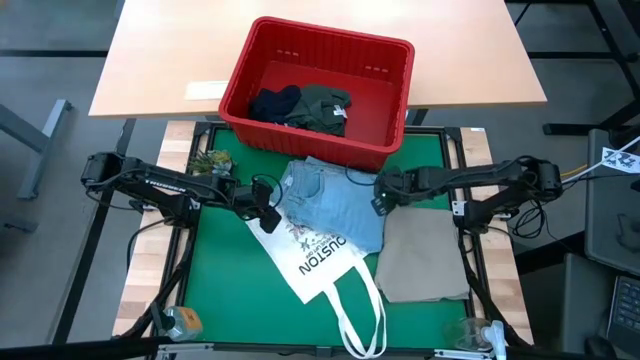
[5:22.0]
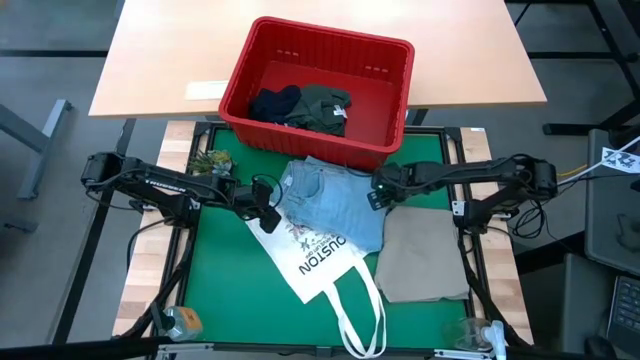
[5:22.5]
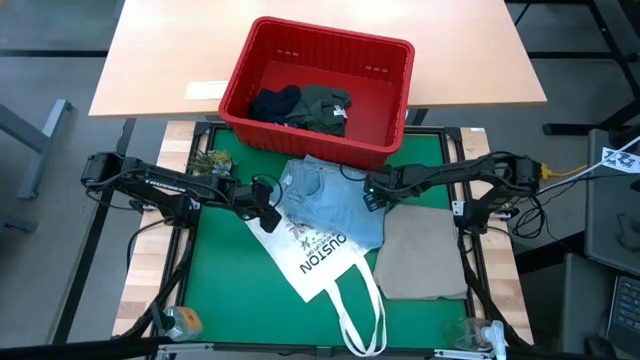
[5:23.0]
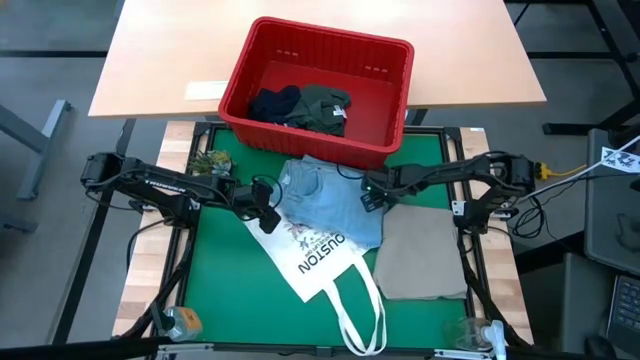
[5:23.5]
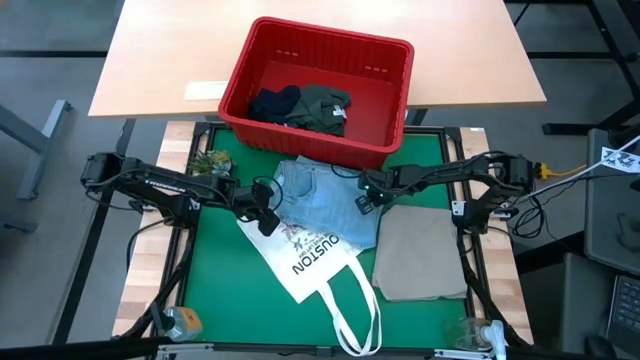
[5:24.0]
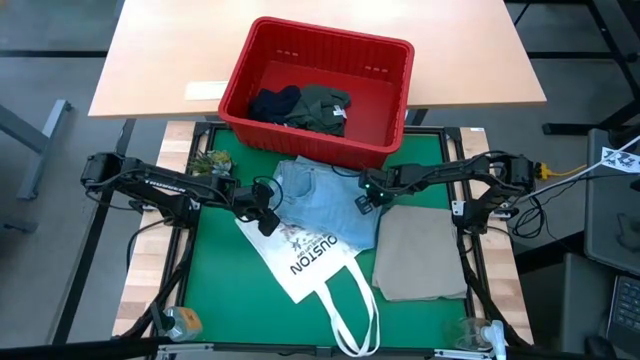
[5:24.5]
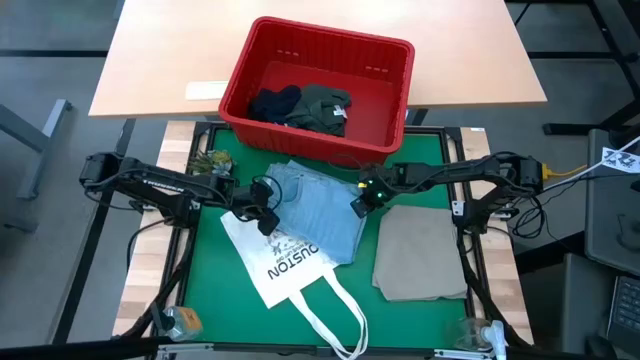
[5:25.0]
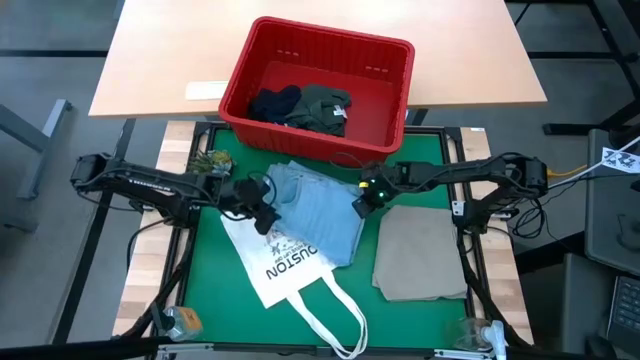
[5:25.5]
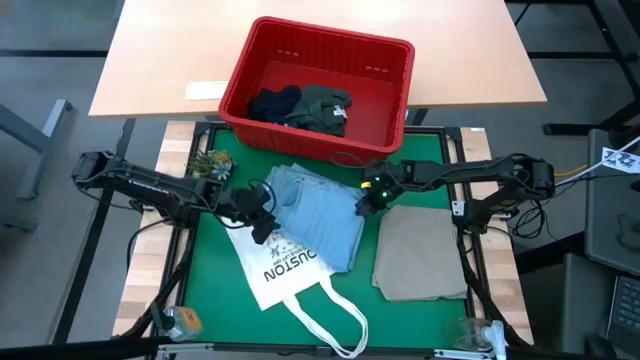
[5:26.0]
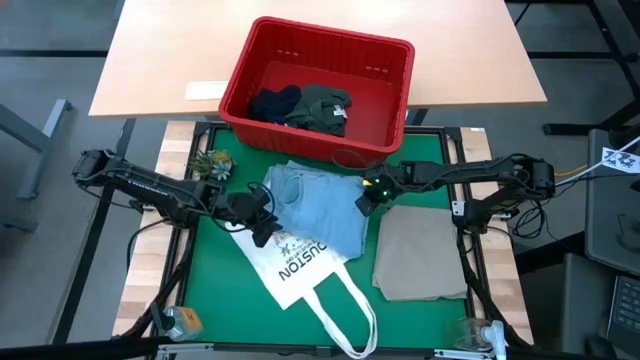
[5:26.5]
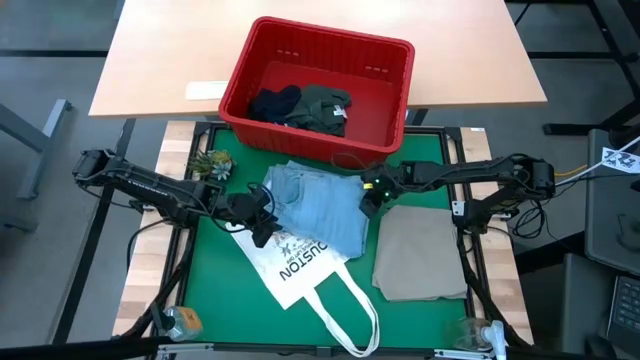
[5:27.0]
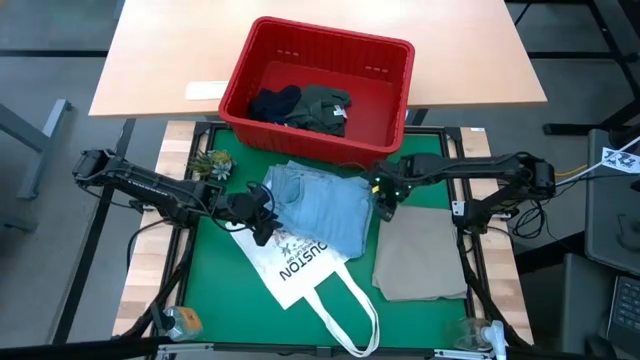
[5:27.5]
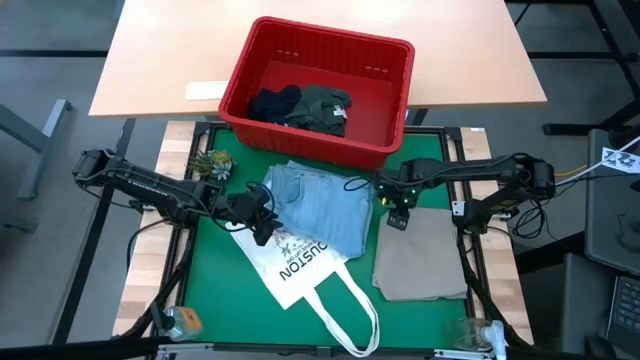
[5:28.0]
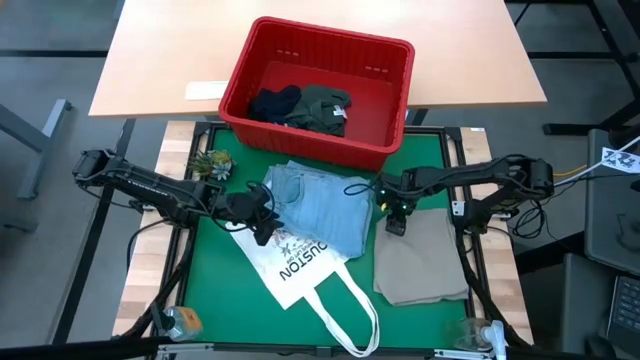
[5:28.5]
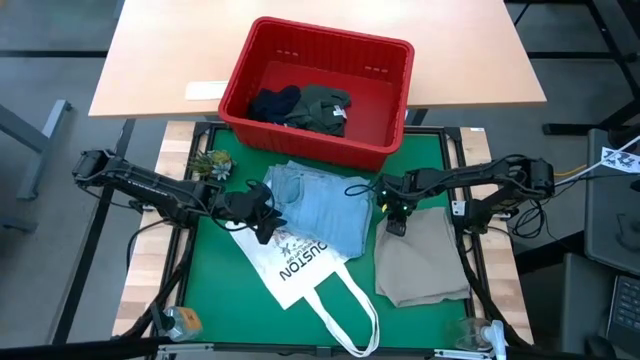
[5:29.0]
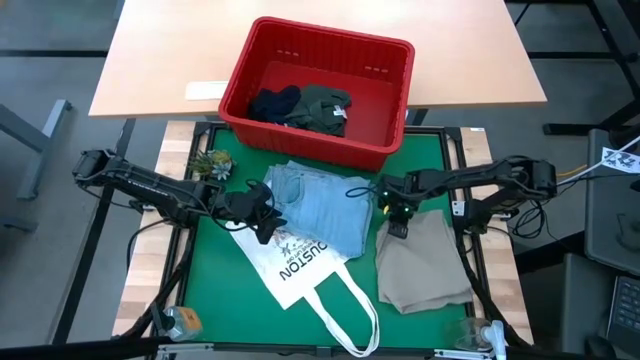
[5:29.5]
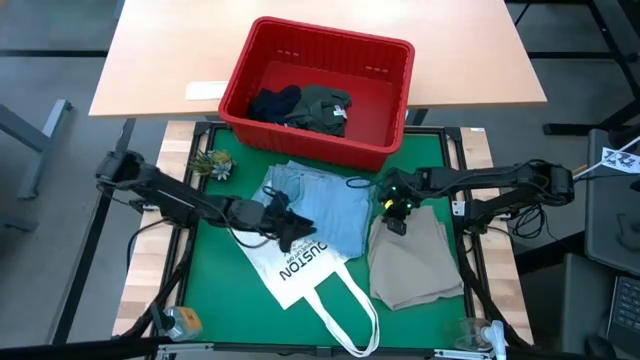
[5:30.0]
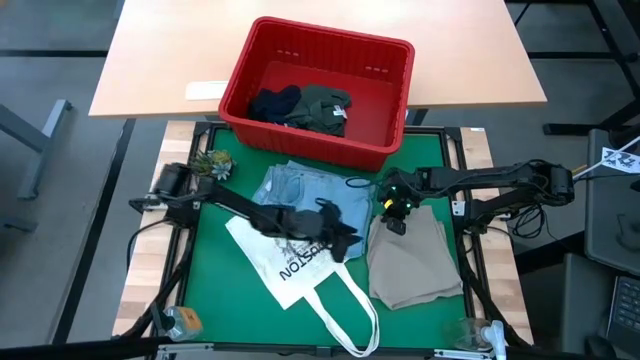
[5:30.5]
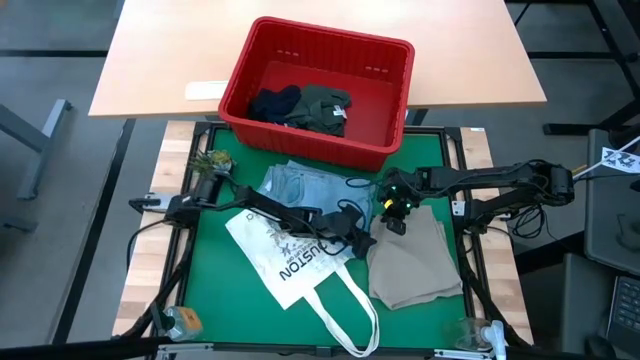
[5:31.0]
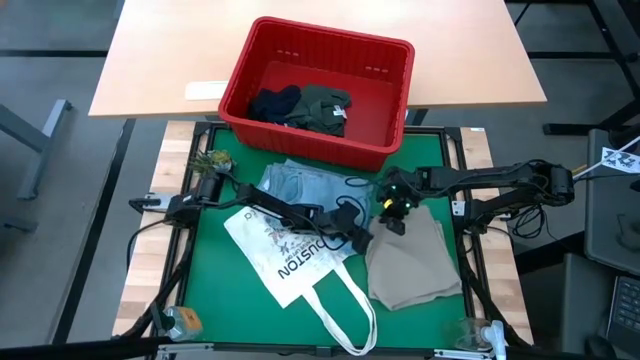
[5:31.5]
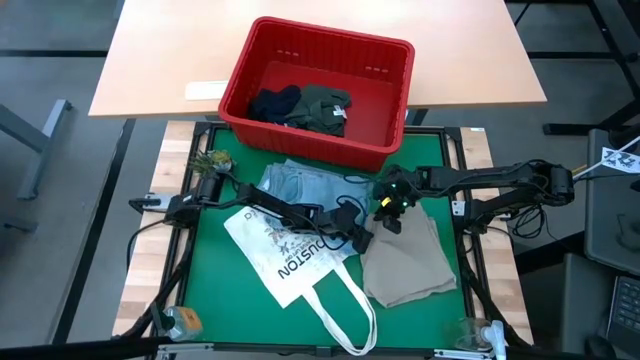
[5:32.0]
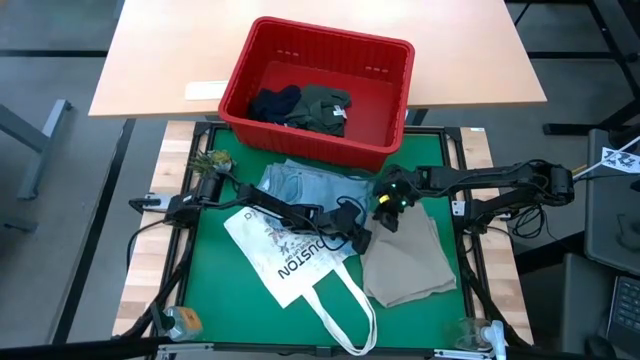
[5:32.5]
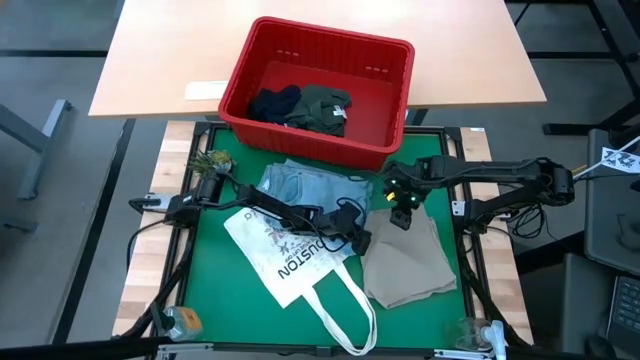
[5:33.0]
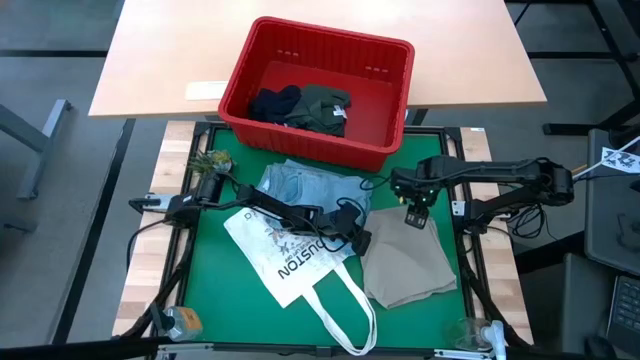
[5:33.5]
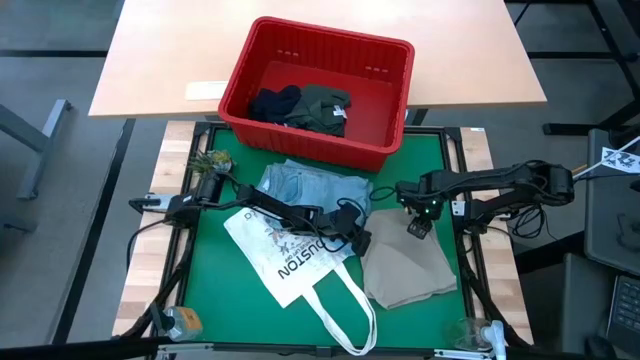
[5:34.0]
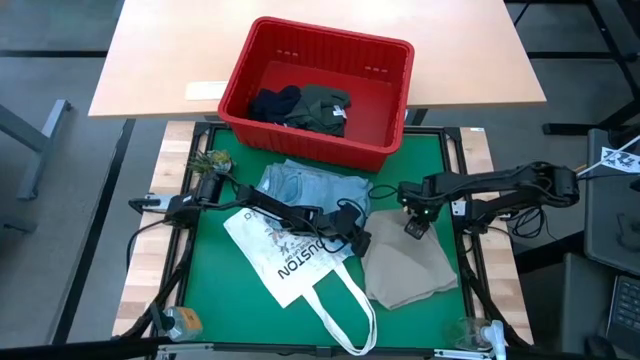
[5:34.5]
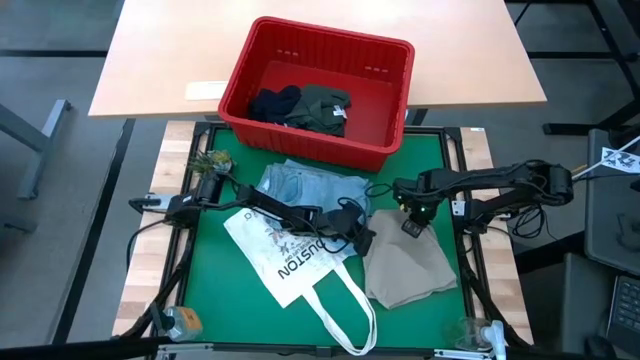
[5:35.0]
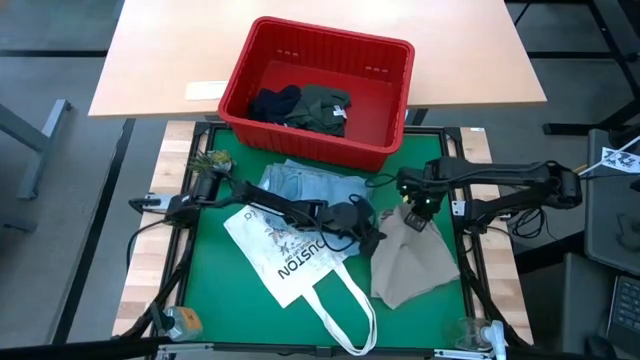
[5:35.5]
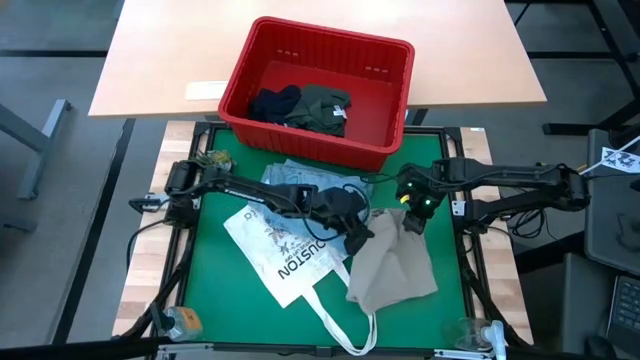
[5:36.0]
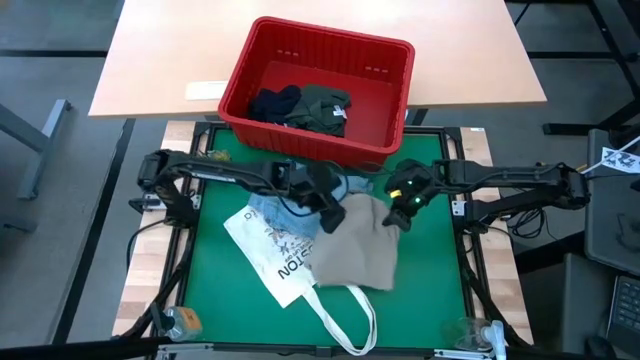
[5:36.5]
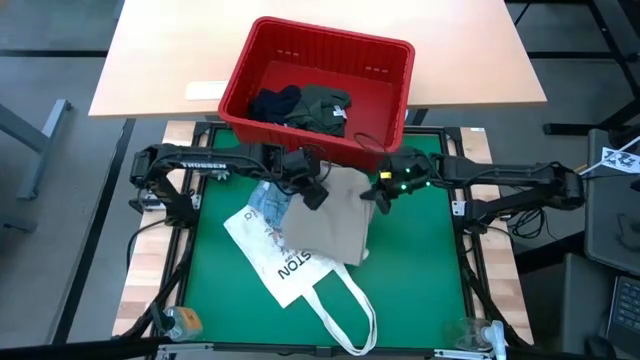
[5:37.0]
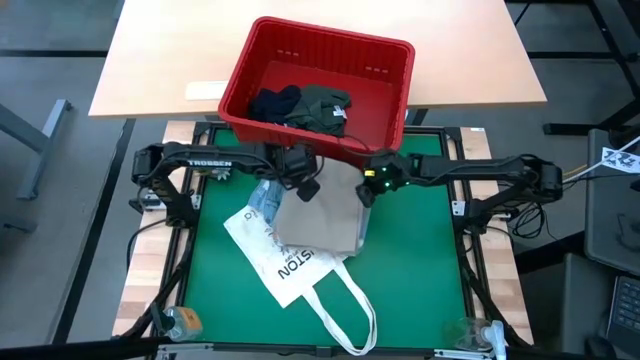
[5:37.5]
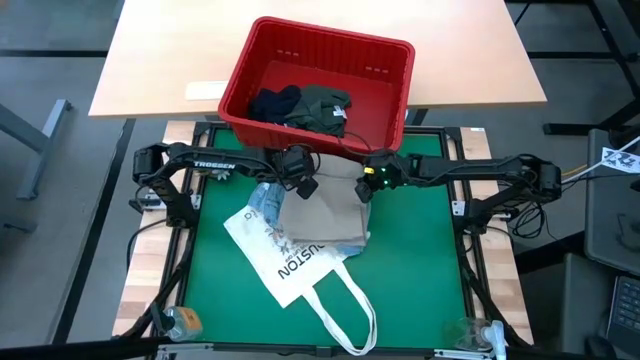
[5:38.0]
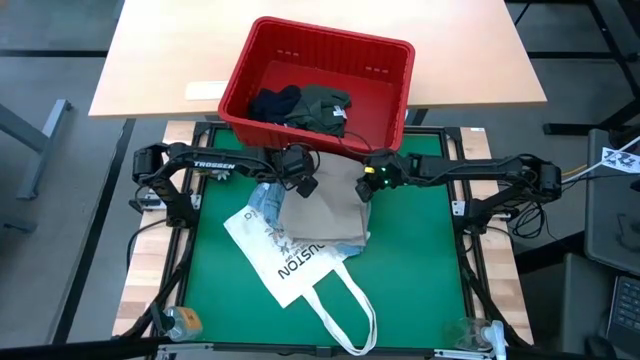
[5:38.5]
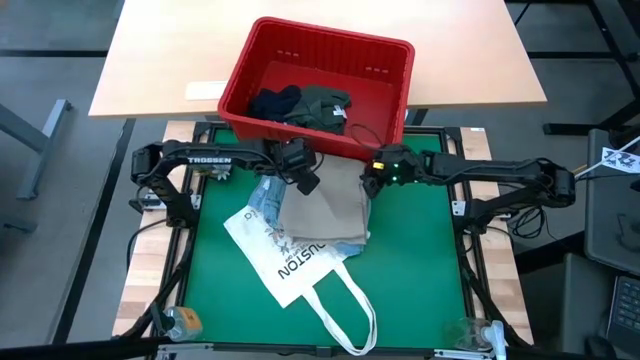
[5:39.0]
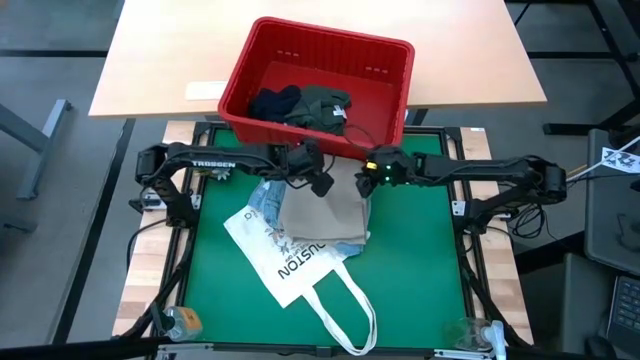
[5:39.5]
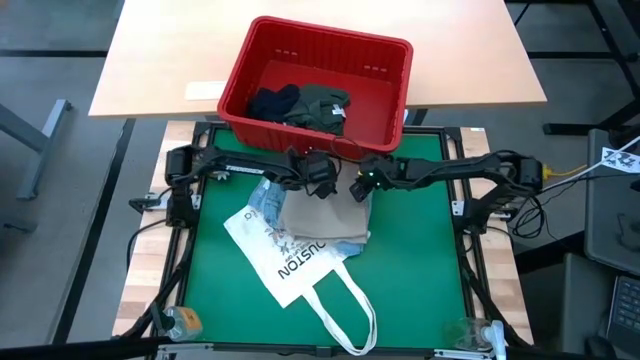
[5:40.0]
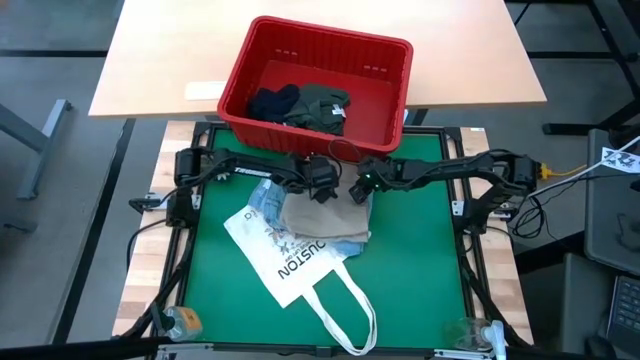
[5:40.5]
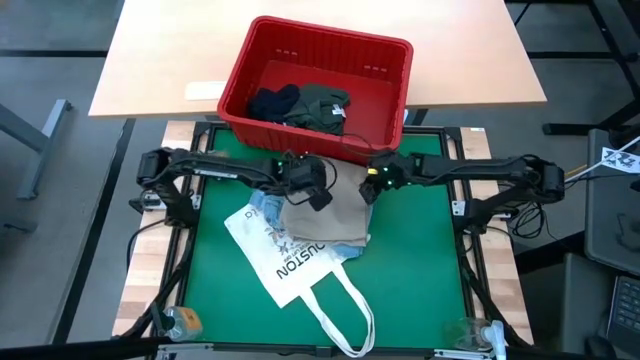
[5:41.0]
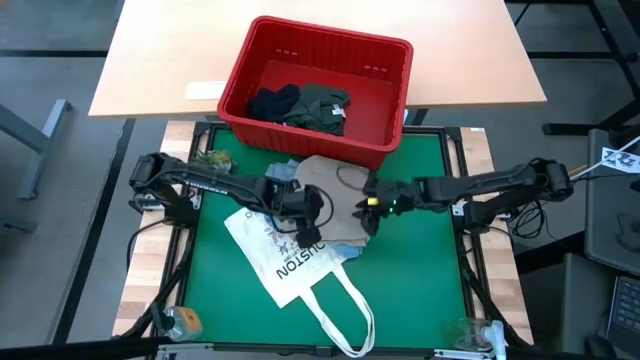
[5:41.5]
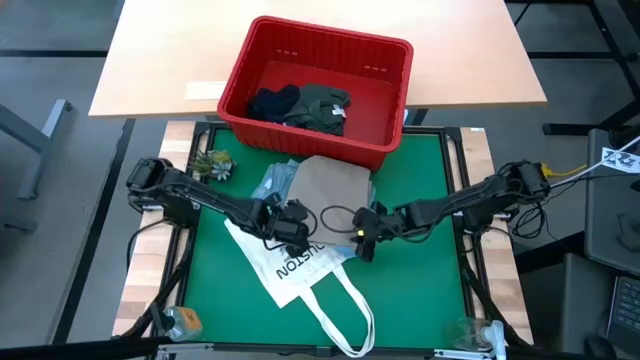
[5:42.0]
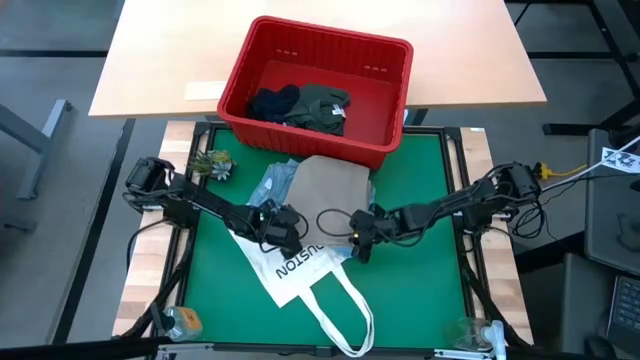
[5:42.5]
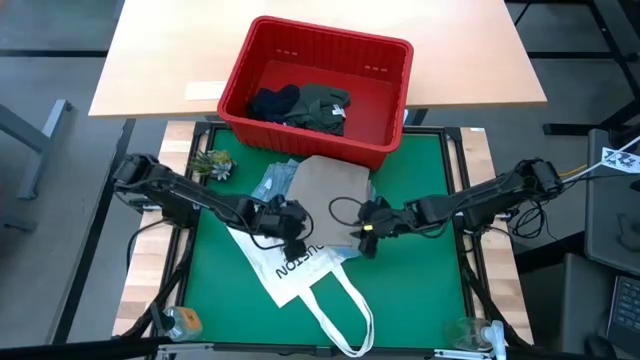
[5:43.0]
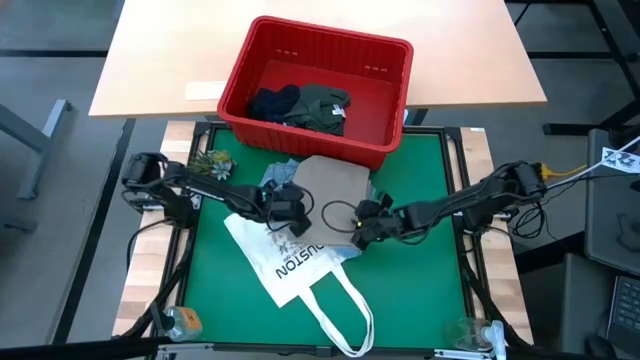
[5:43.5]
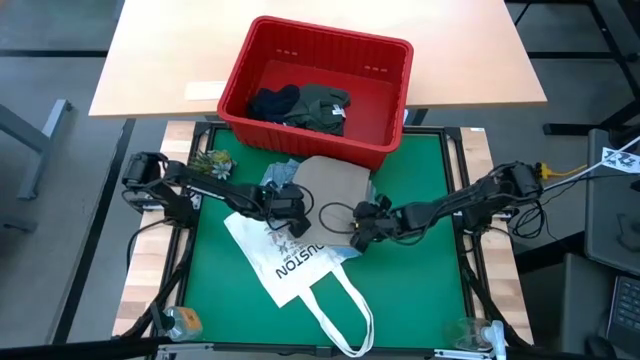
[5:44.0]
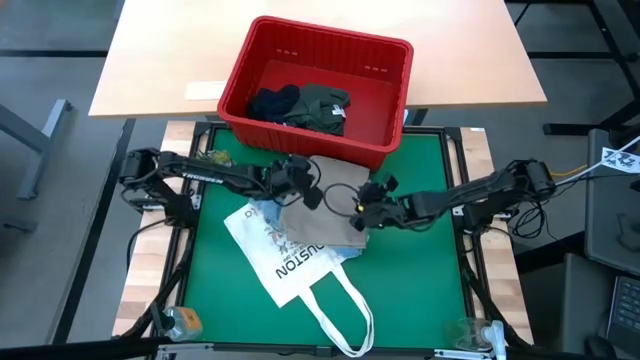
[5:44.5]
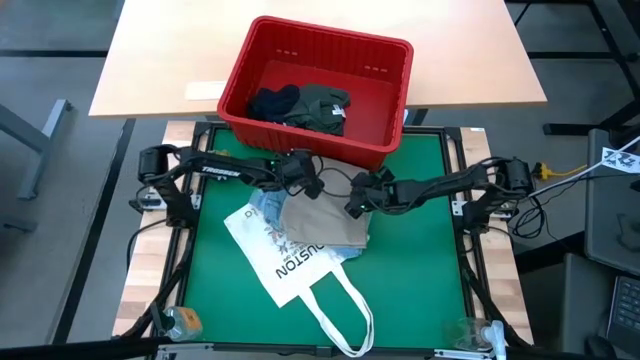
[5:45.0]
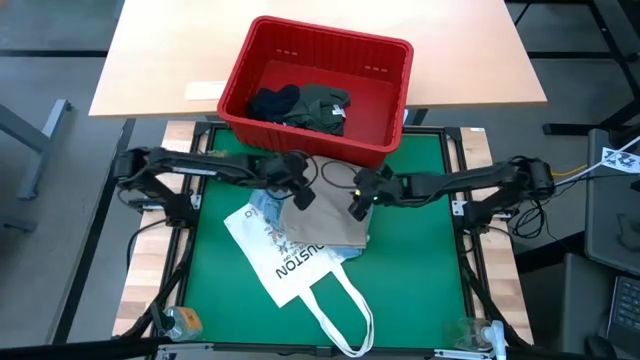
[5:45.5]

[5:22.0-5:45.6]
Task: Fold Laundry from Bin
Stack the beige shorts on top of the light blue pants
